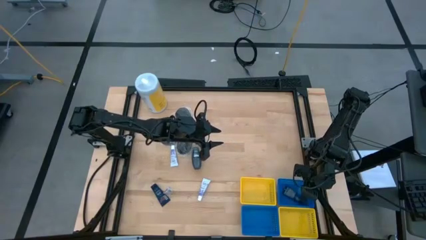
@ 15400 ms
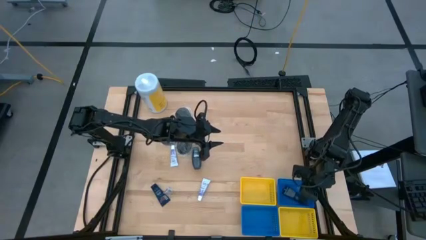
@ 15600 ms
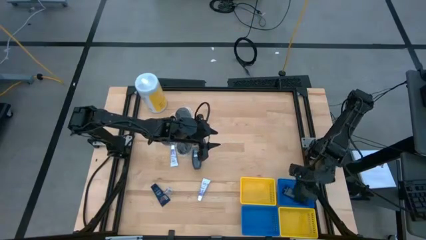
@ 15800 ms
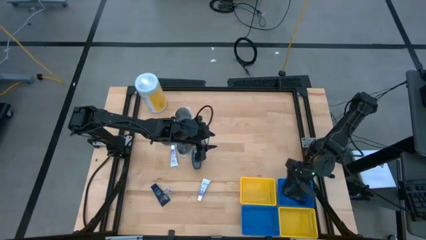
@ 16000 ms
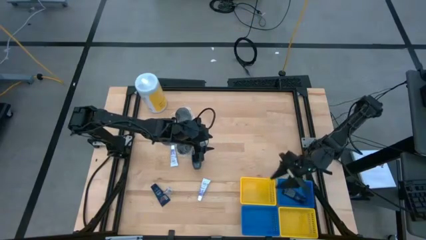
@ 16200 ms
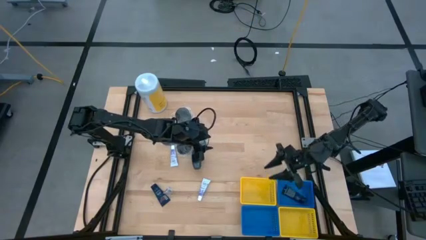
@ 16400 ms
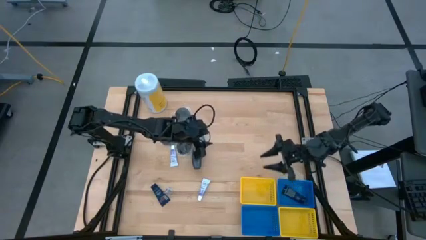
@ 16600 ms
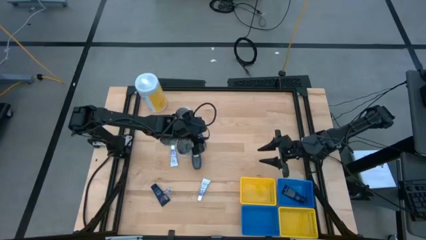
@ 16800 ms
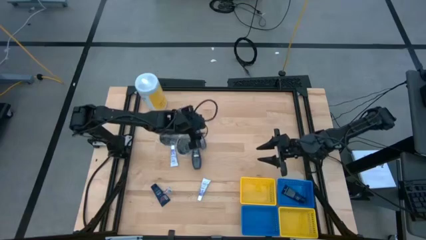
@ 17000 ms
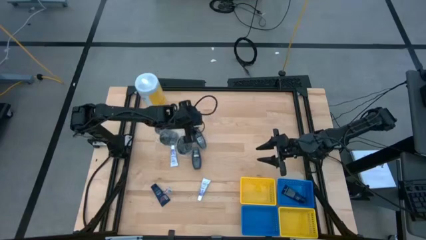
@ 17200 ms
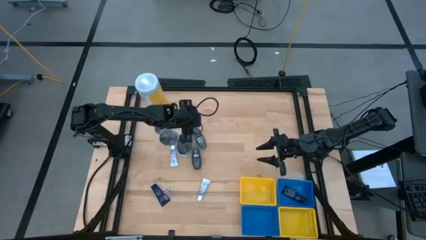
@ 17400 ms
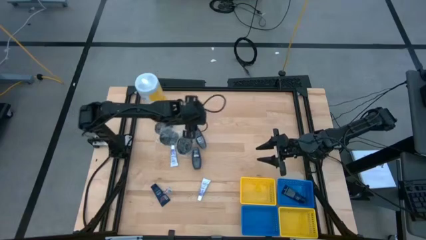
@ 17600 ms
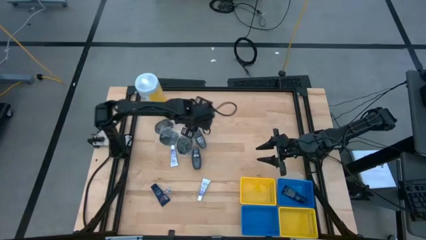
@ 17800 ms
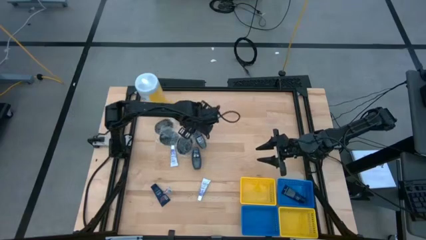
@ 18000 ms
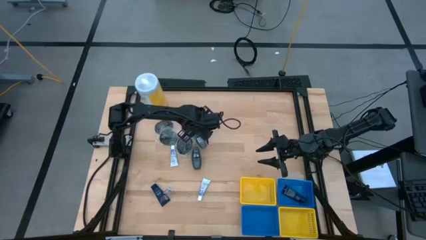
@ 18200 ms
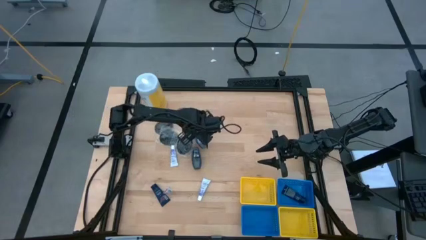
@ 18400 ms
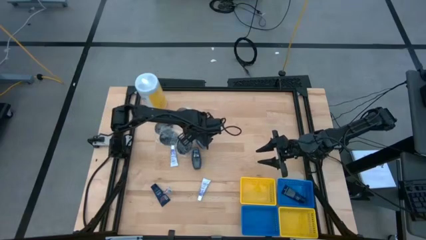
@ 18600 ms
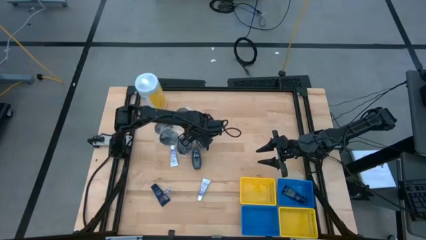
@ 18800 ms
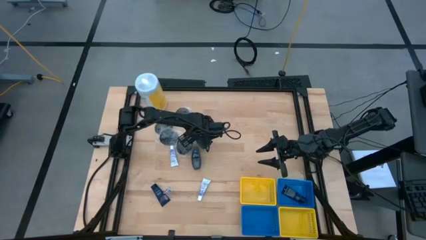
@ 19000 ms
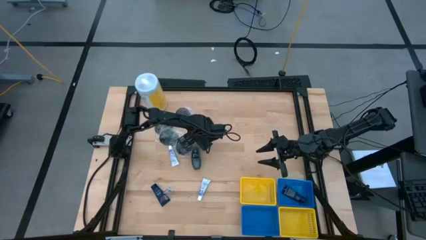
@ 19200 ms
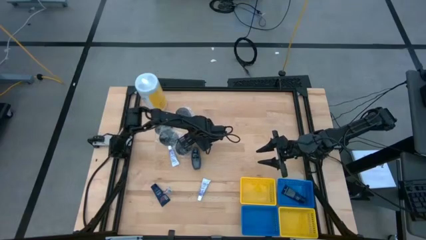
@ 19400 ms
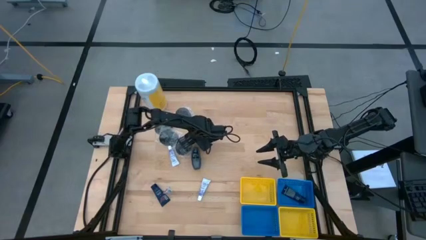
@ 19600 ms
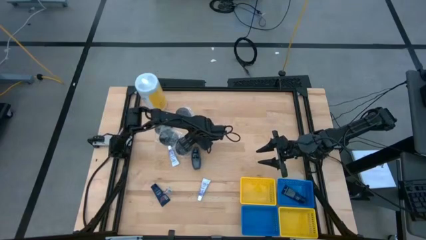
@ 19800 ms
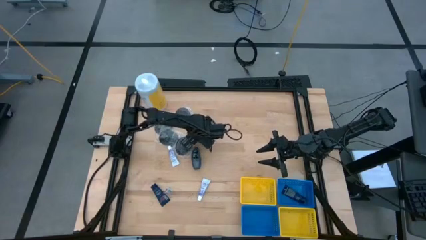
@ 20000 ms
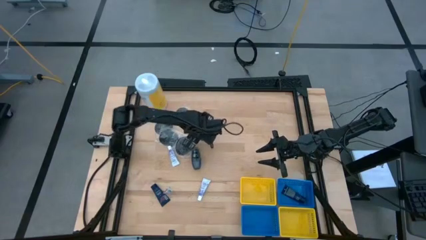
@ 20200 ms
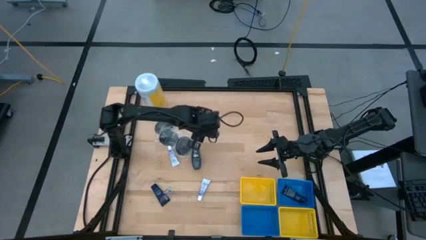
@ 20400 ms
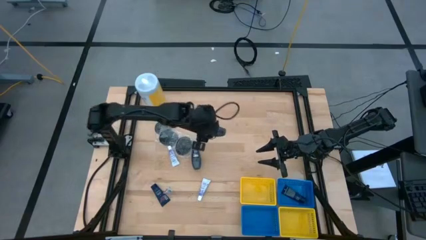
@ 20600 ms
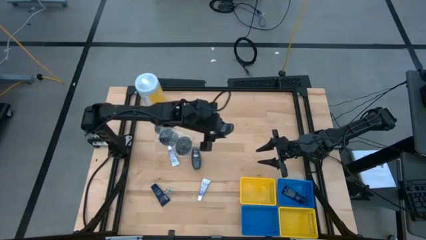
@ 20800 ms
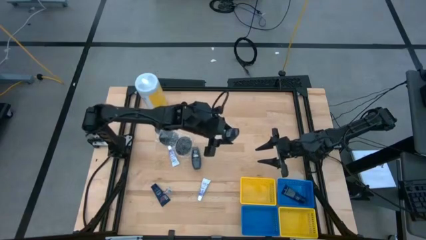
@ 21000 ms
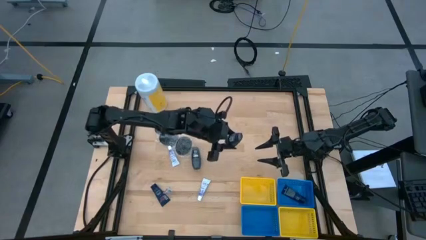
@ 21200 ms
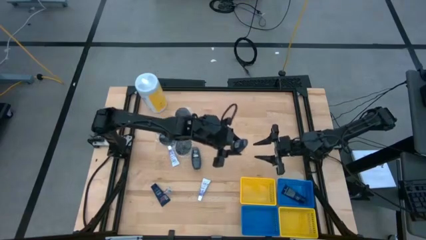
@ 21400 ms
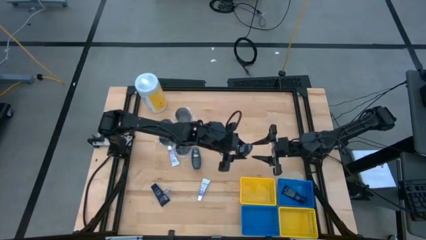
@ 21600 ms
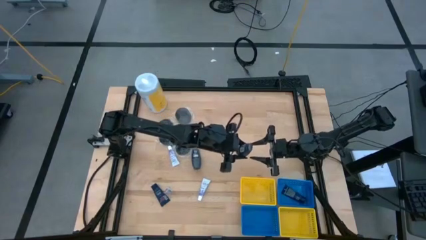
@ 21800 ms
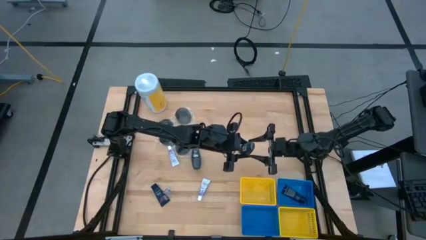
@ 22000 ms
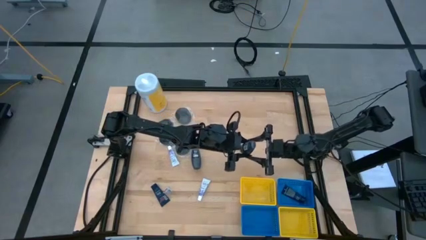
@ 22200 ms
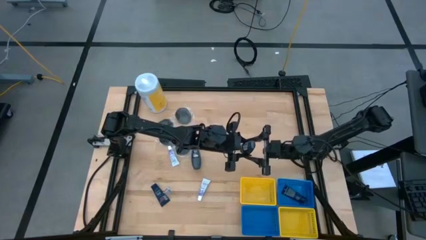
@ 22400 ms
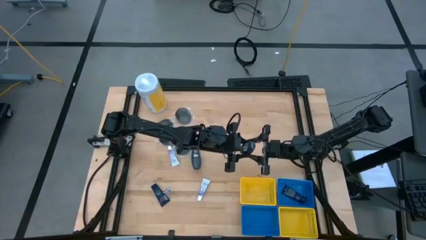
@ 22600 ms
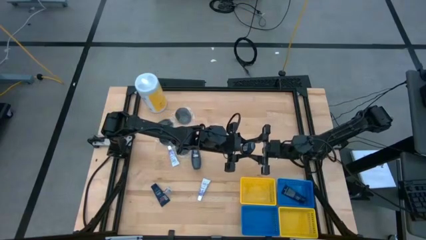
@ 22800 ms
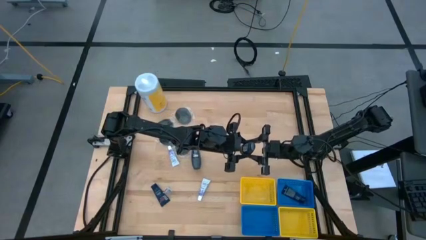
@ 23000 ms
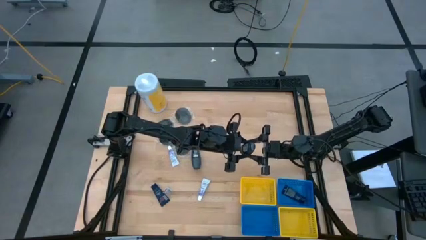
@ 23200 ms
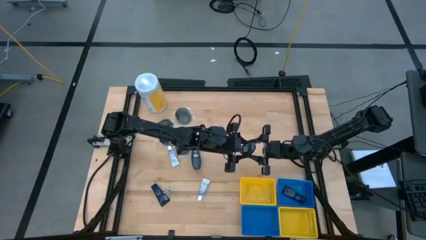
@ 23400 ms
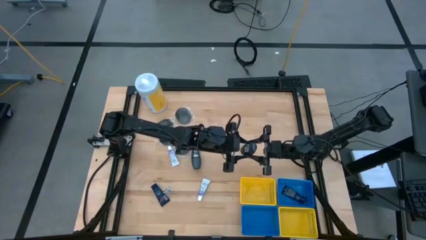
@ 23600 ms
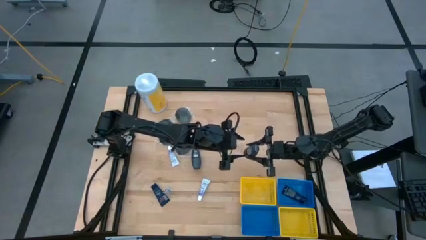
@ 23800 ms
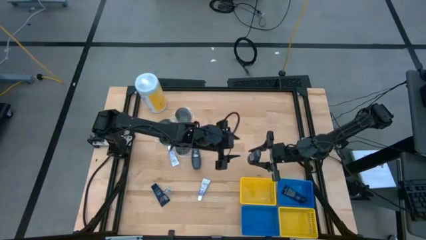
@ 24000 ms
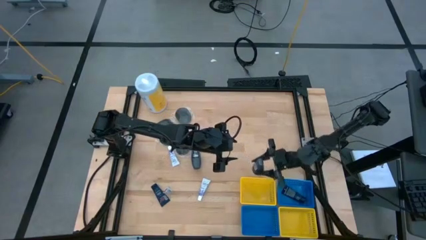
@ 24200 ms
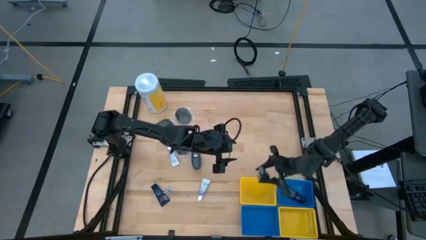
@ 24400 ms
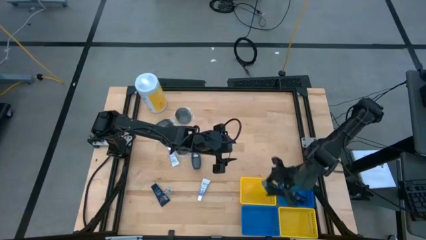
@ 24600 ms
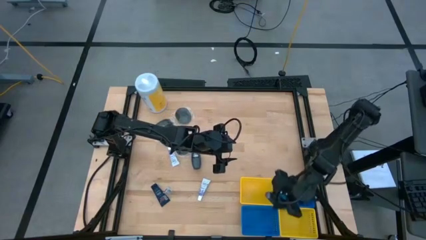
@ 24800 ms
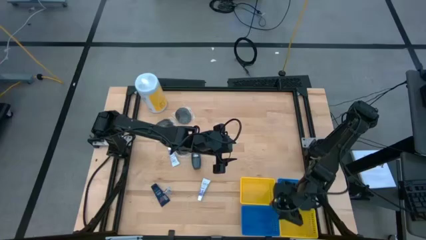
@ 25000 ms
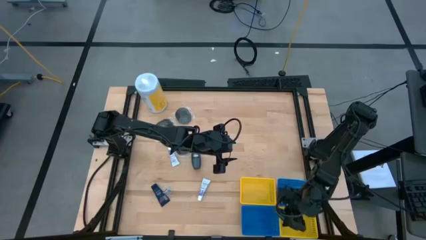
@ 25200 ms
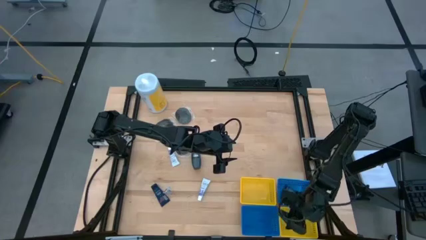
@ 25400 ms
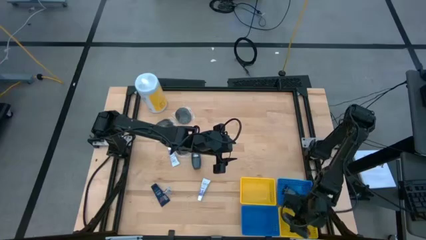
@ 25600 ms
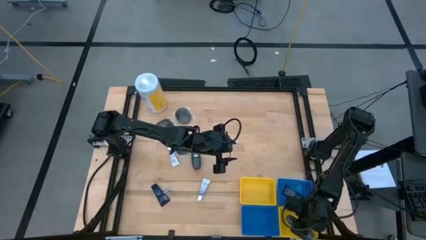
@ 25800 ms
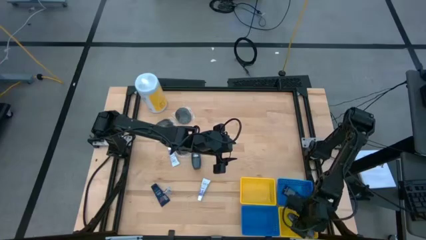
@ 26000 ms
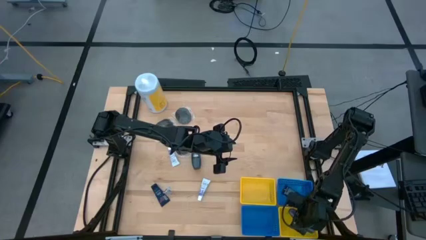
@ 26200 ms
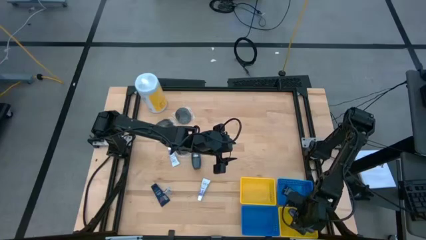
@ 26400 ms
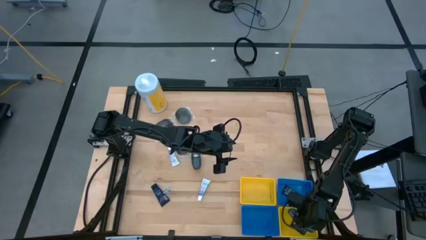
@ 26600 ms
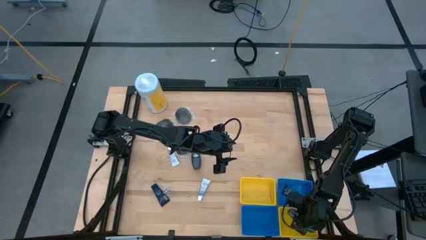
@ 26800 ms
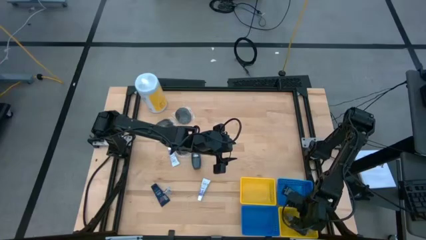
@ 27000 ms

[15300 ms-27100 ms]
Task: Pick & Place Travel size toiletries
Put the black deodorant into the bottom yellow bin
